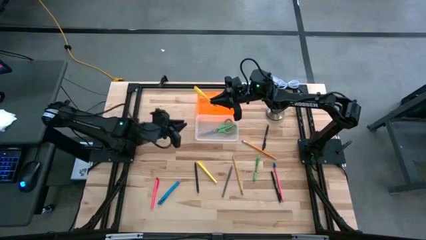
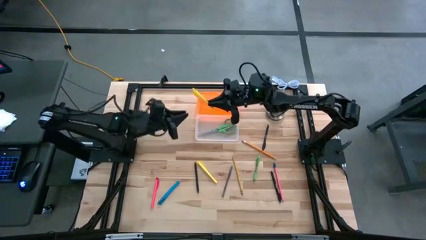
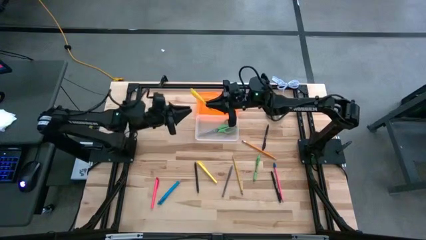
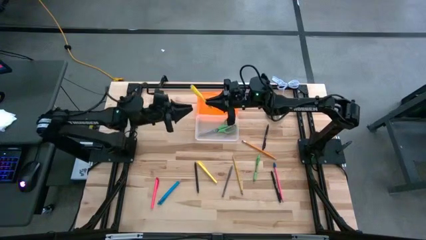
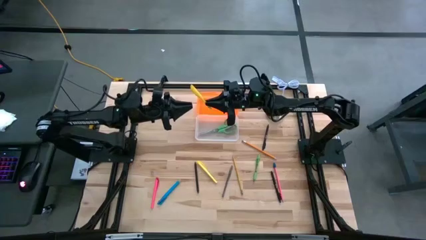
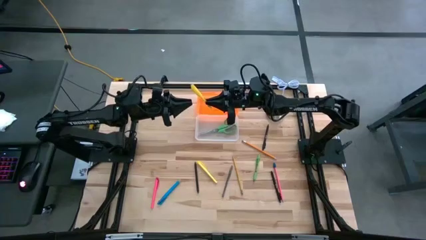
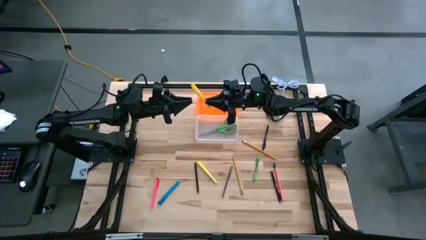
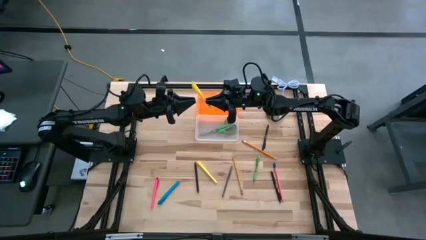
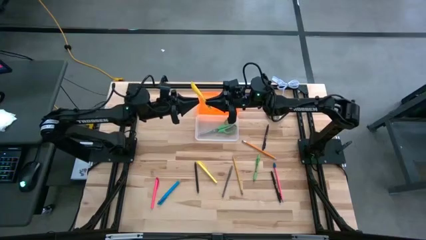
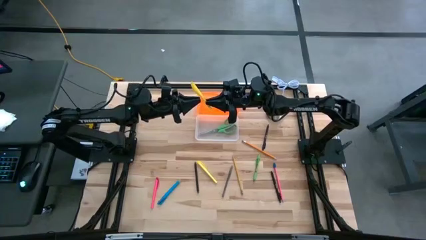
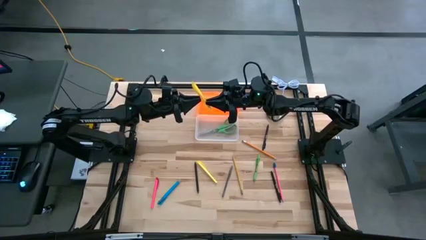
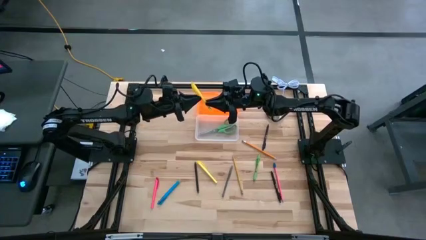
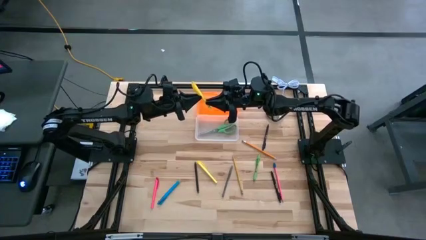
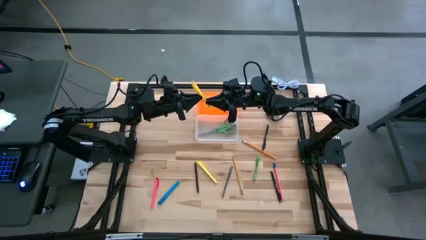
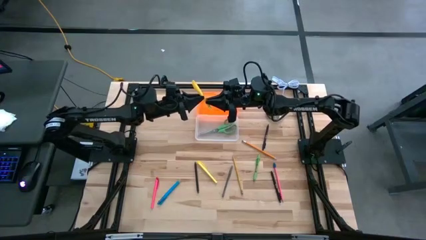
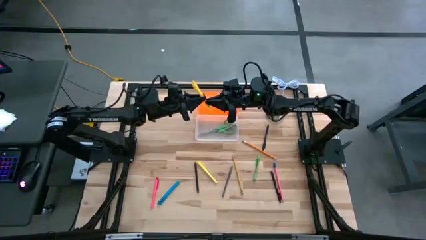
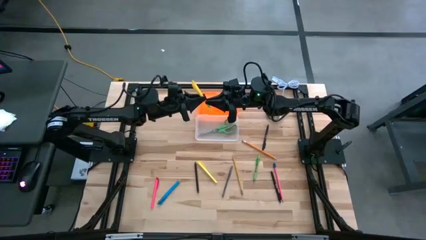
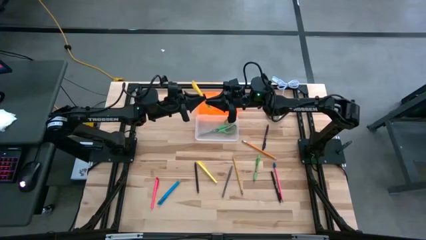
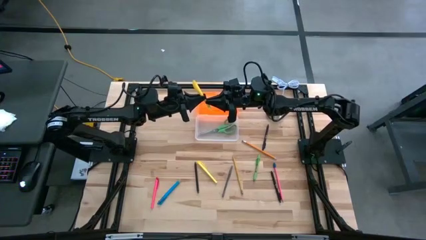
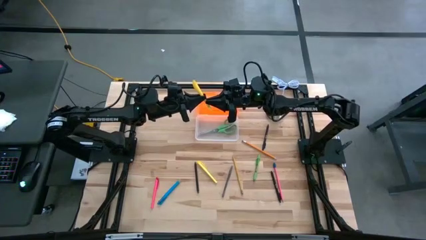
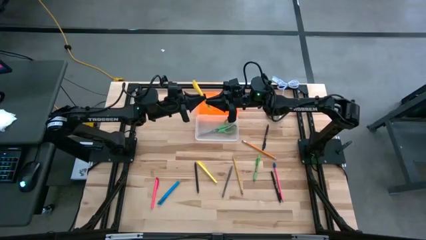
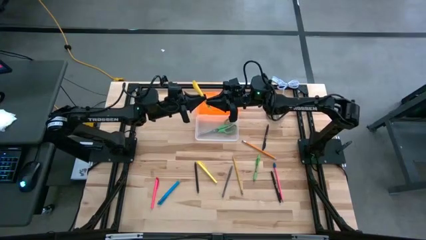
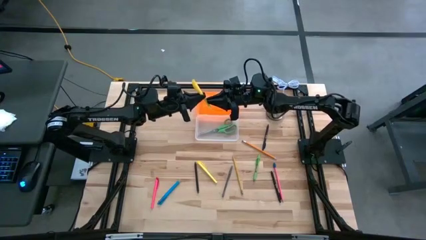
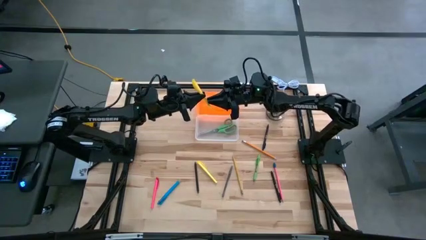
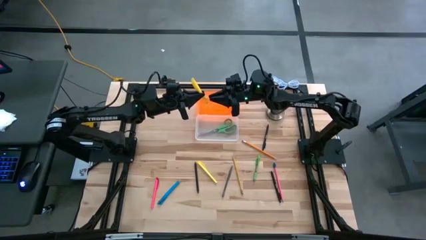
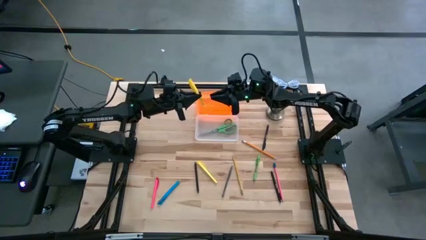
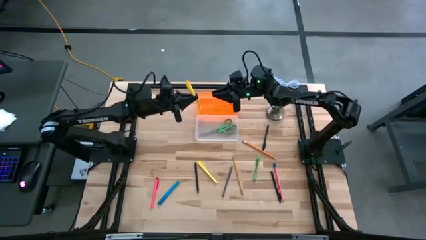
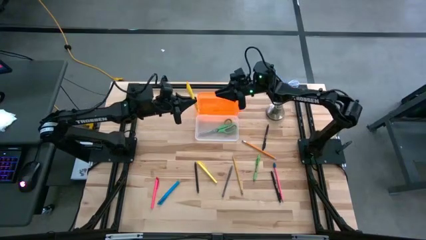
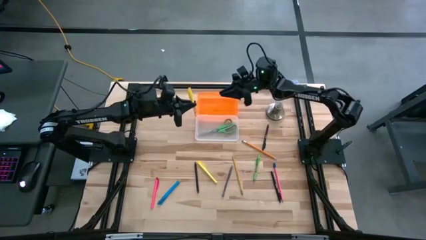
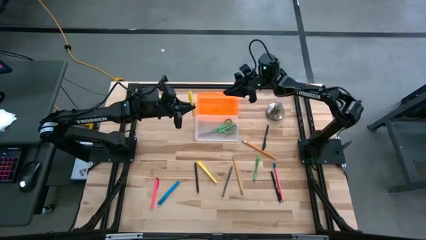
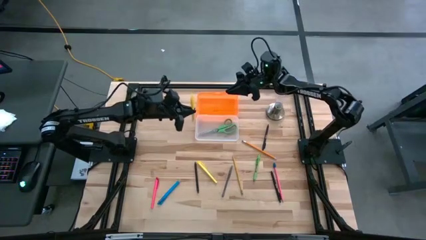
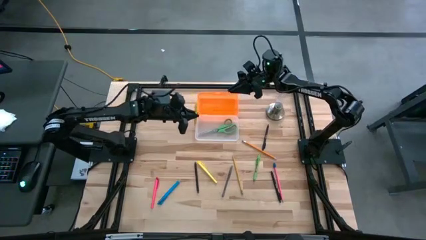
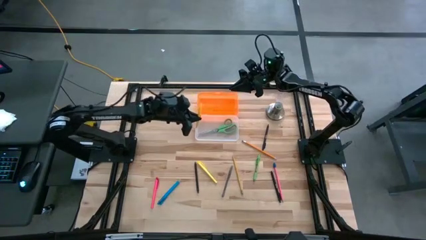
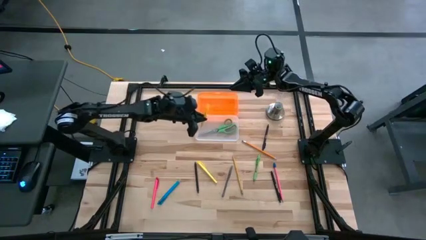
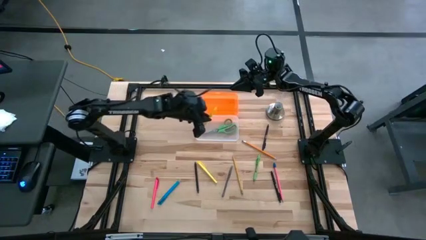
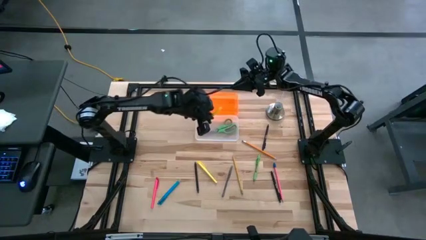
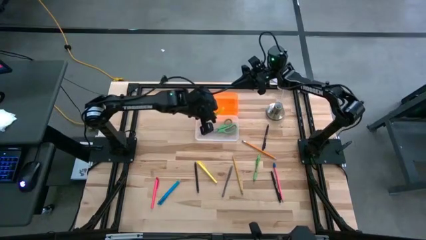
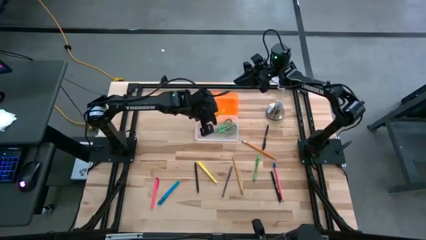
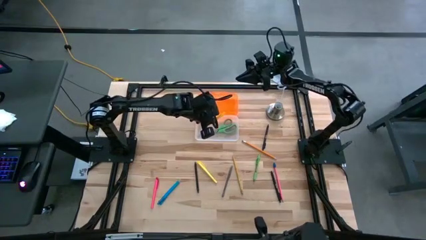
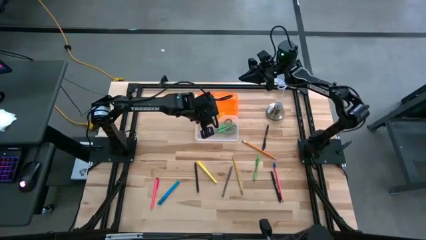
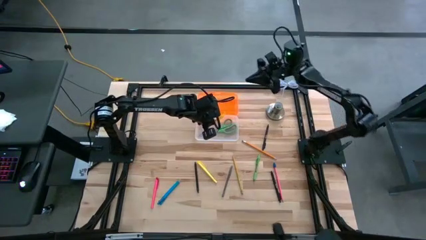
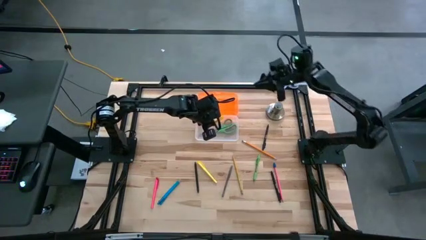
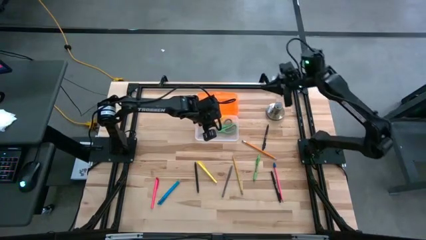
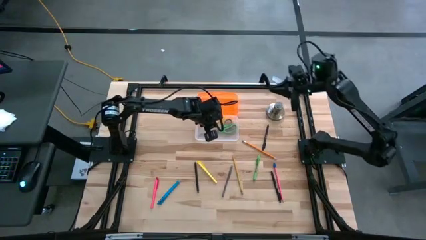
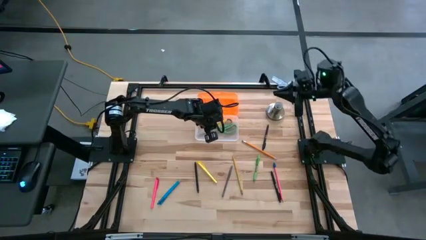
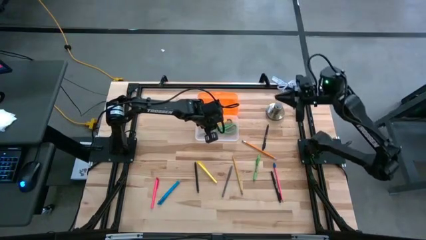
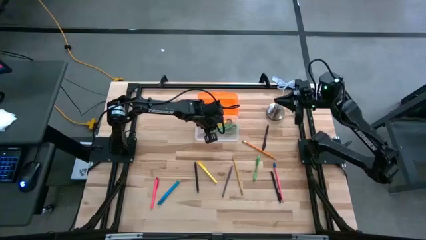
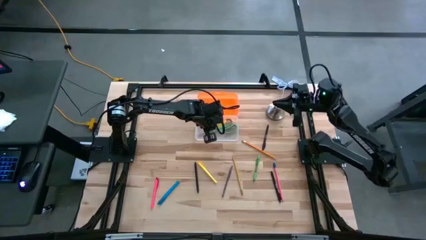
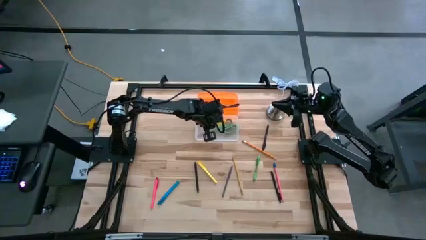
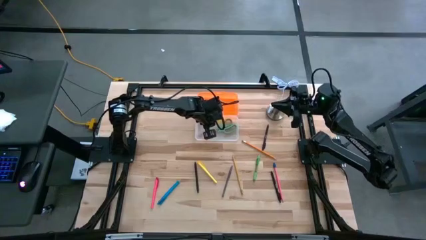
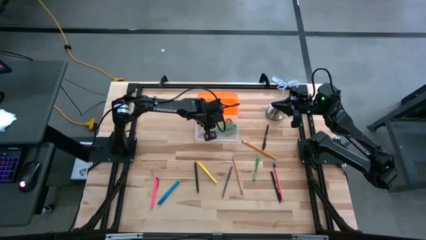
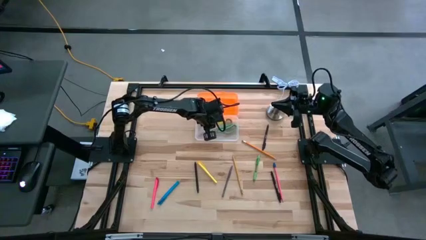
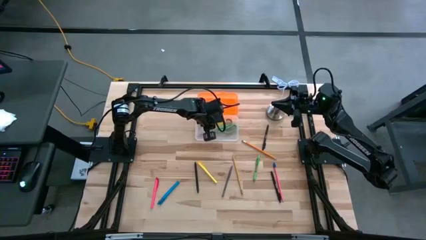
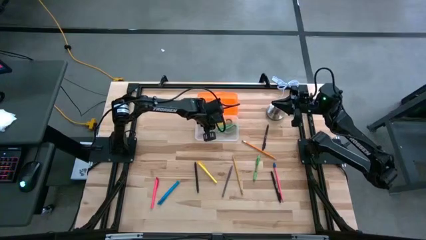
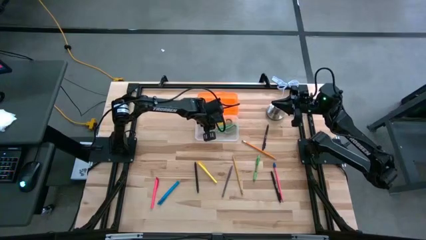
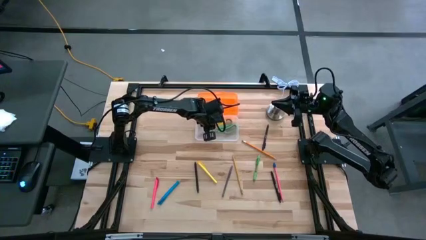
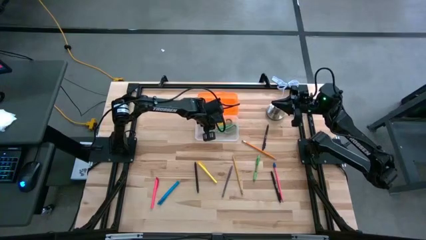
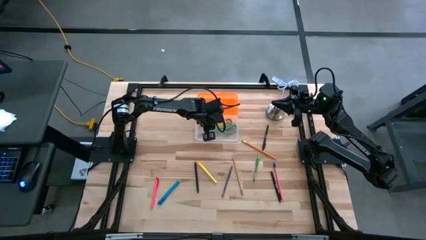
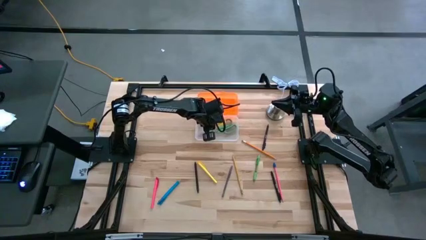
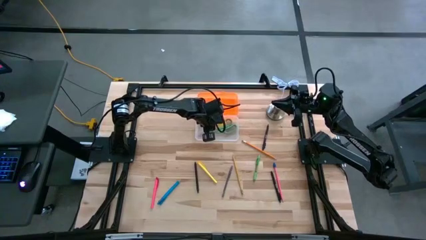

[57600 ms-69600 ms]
Task: Pick & place school supplies into a supply box
Put the top yellow pen into the orange supply box

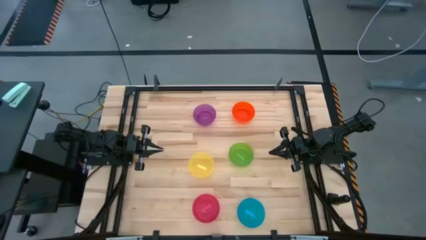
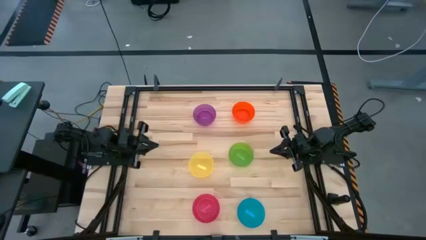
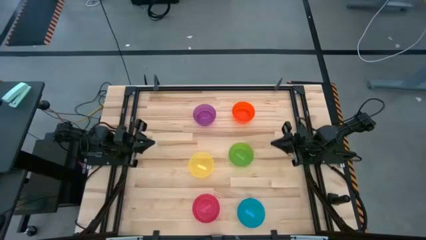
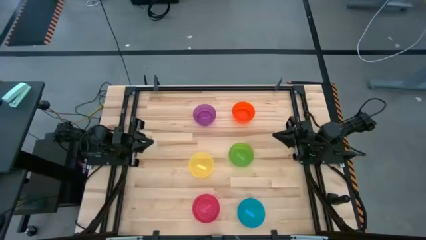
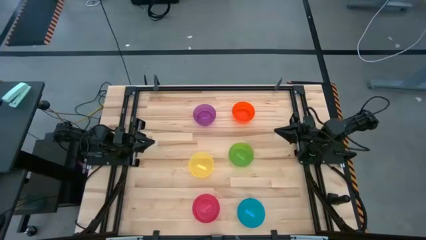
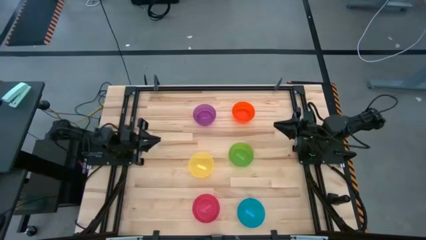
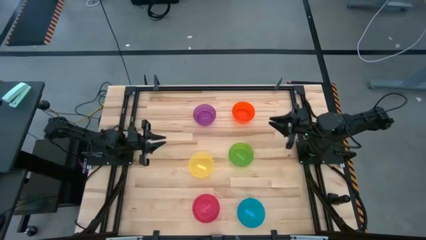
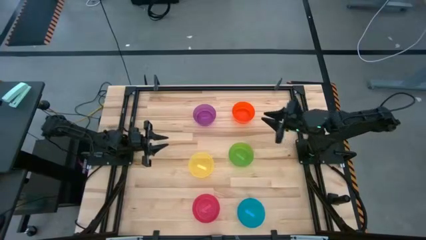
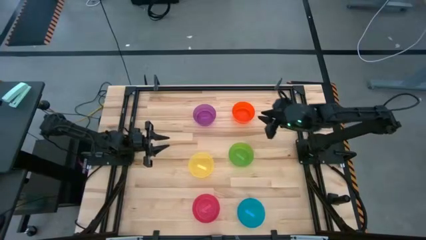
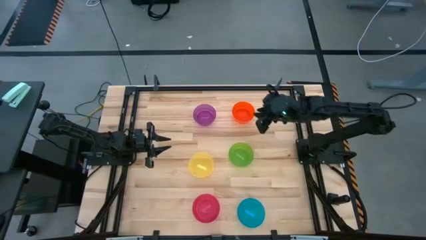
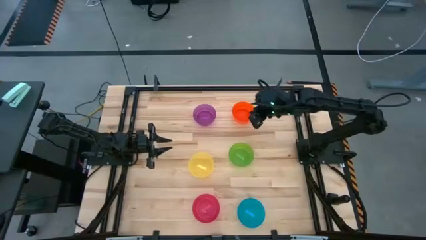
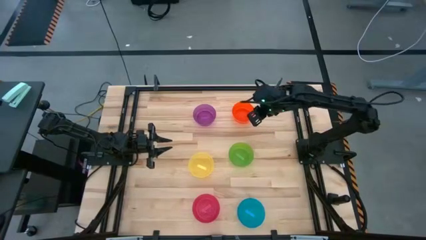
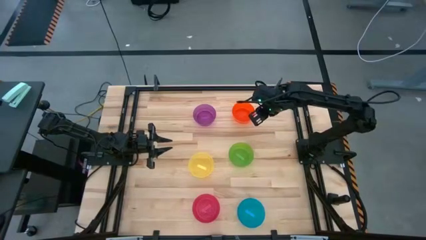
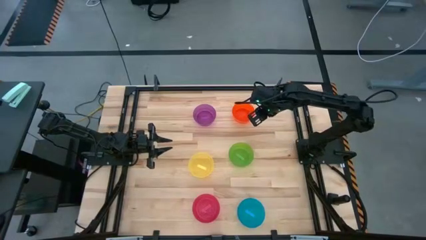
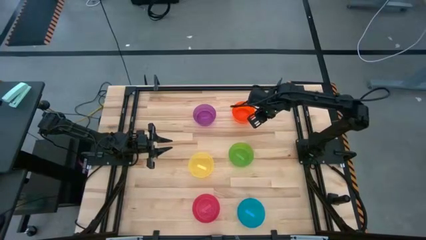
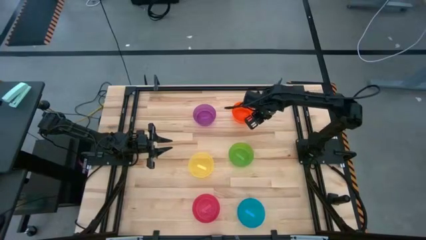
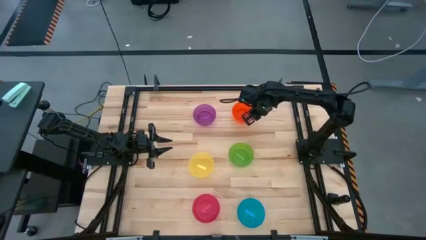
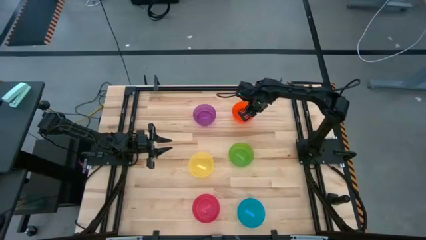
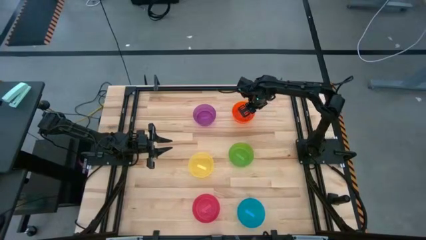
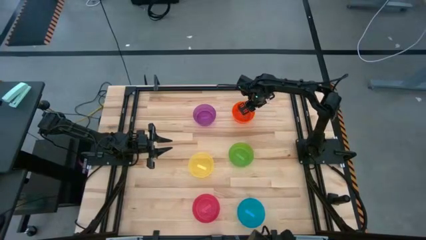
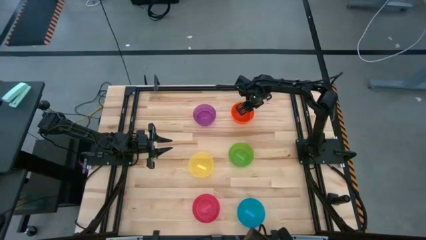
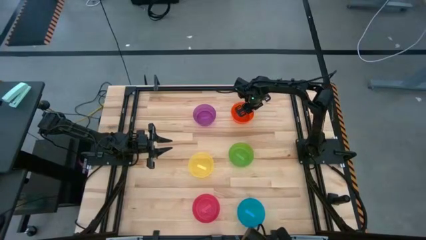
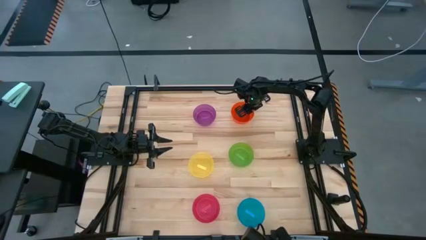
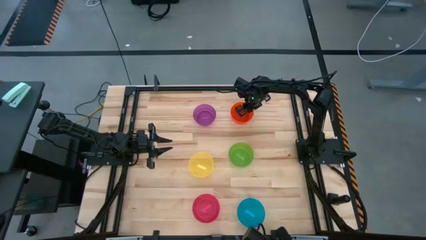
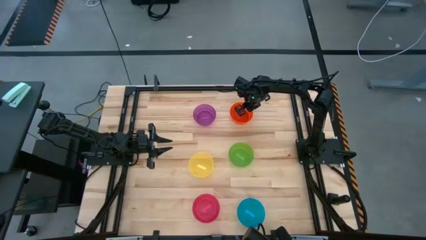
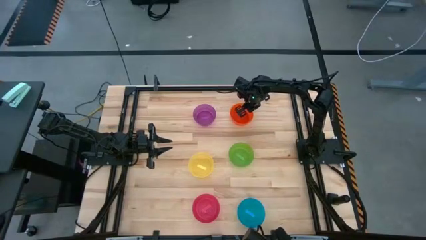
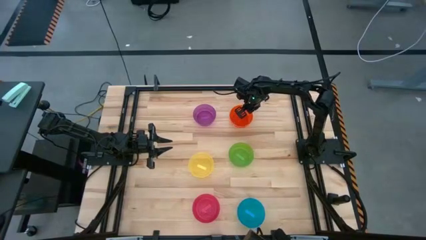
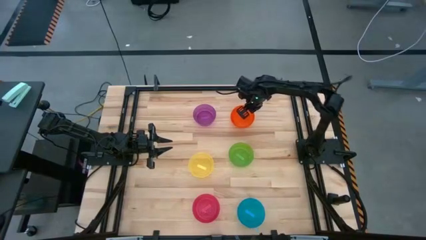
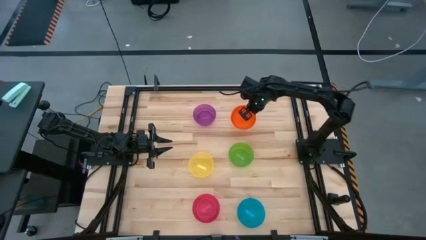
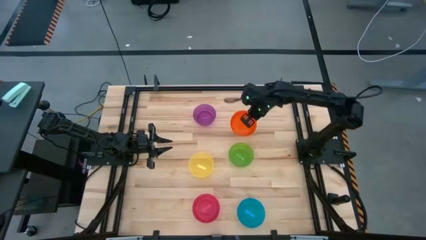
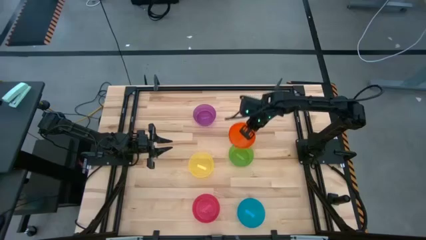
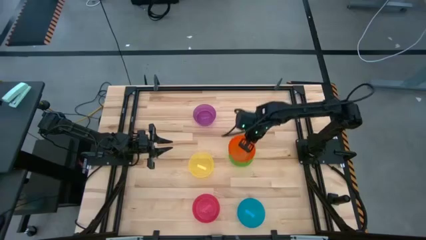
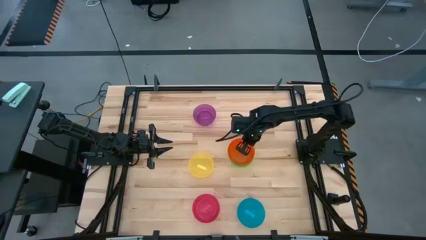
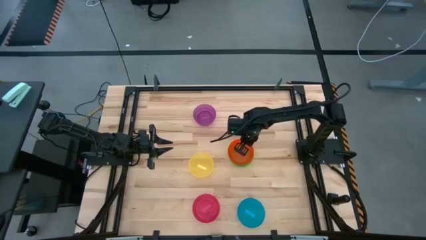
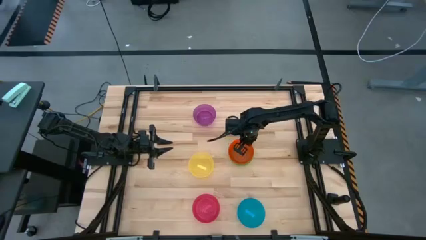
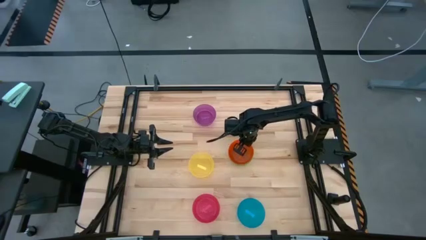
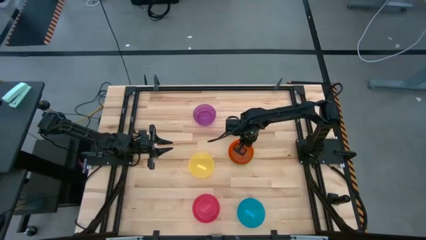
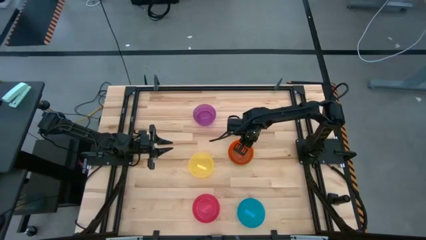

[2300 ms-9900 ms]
Task: Nest bowls inside each other
Stack the orange bowl on top of the green bowl
